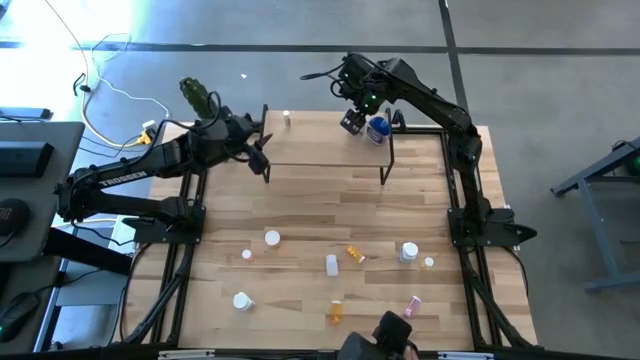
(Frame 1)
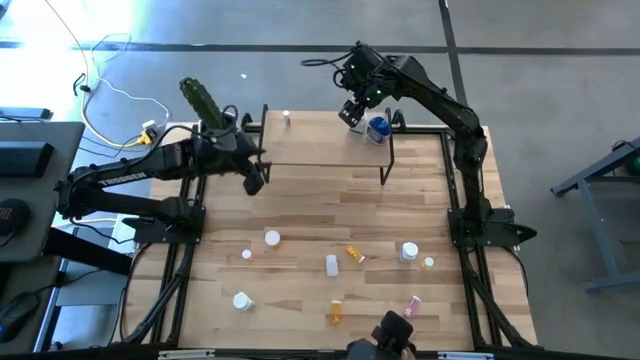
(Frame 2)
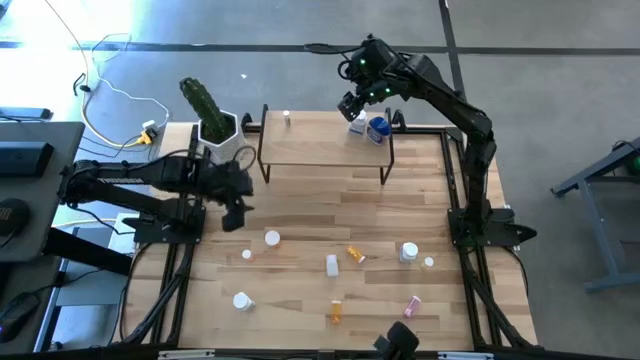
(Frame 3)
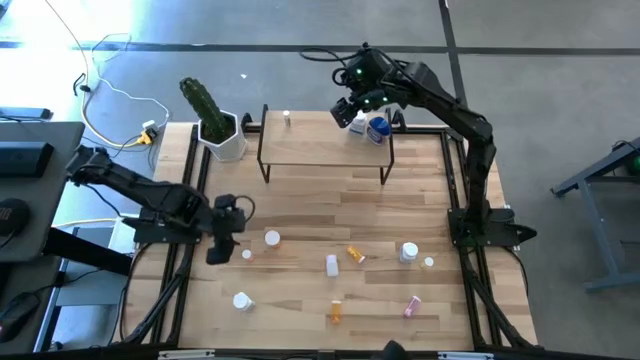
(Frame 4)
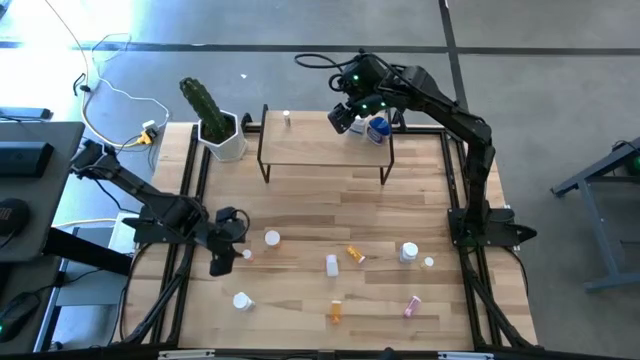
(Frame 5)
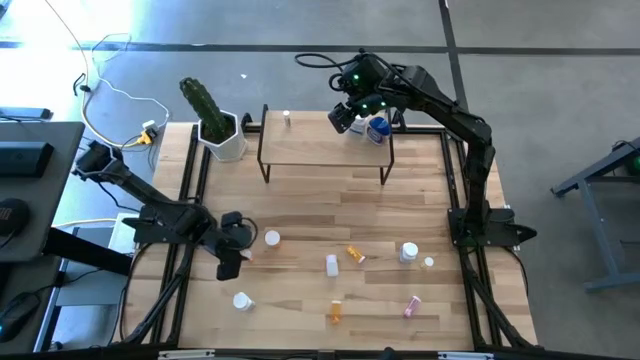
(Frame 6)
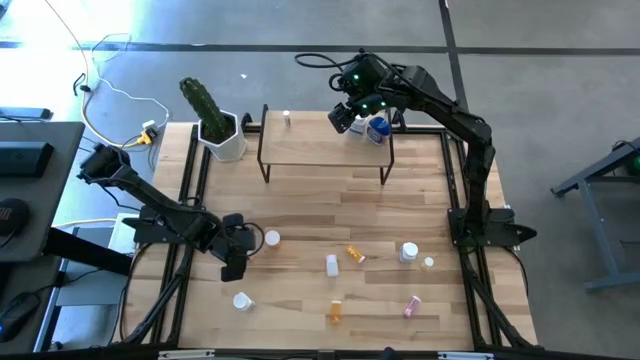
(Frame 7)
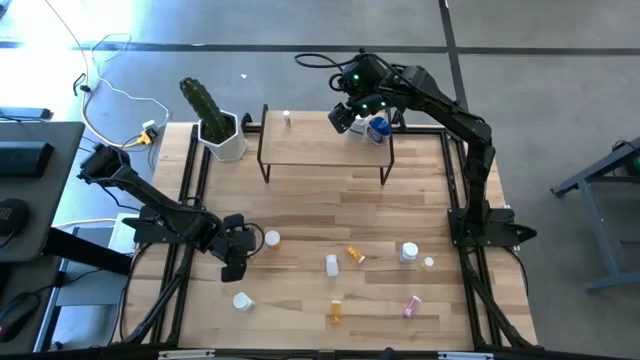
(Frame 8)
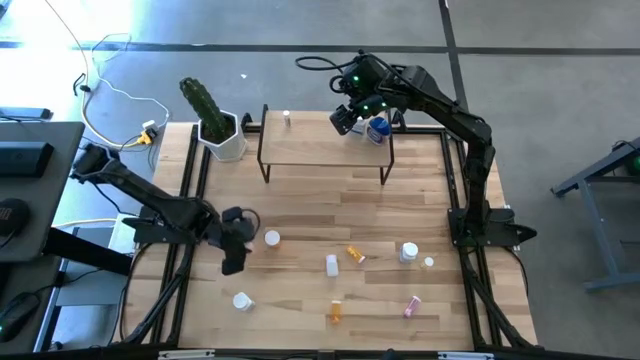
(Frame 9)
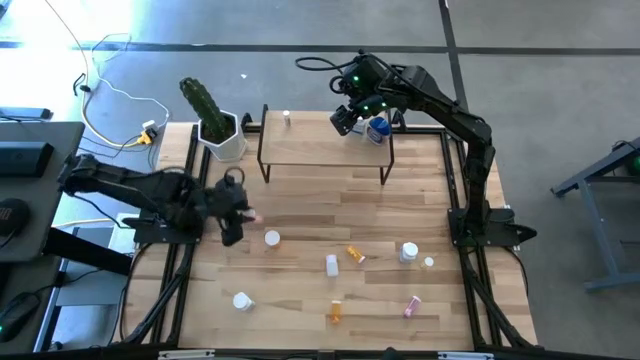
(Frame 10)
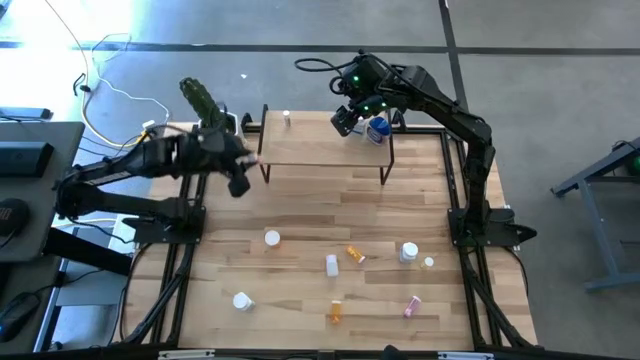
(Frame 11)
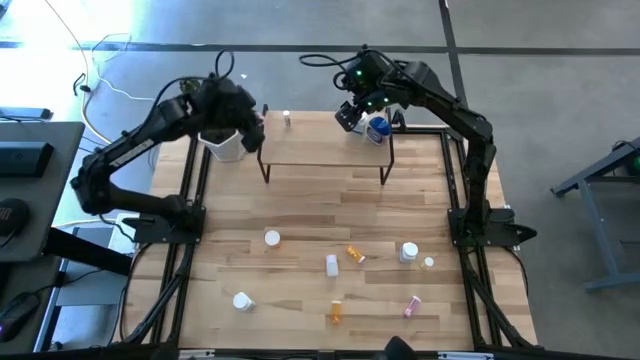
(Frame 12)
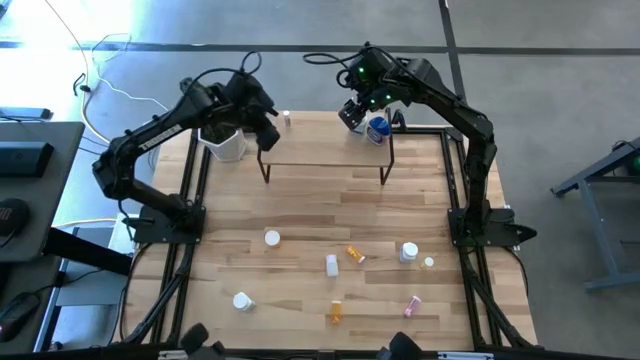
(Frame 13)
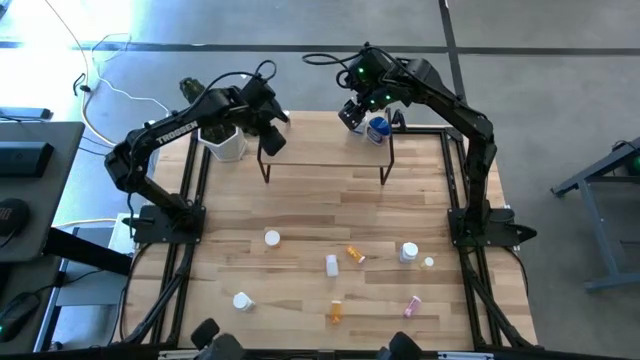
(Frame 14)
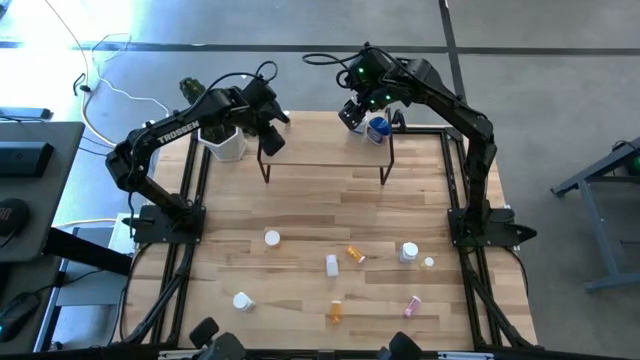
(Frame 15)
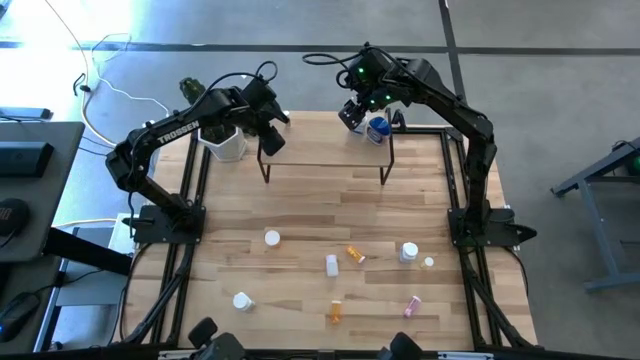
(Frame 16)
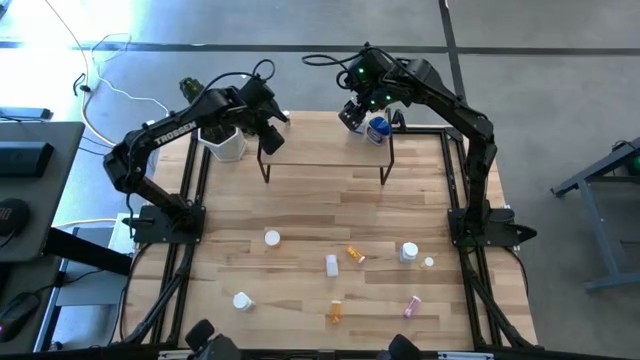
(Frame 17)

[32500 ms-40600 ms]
Task: Pick and place medicine bottles onto shelf by color
Put the left pink pill bottle on the shelf

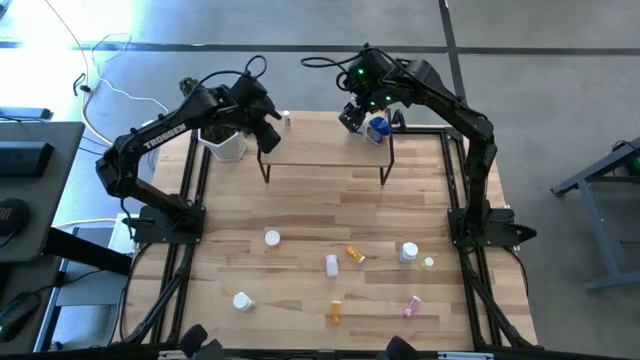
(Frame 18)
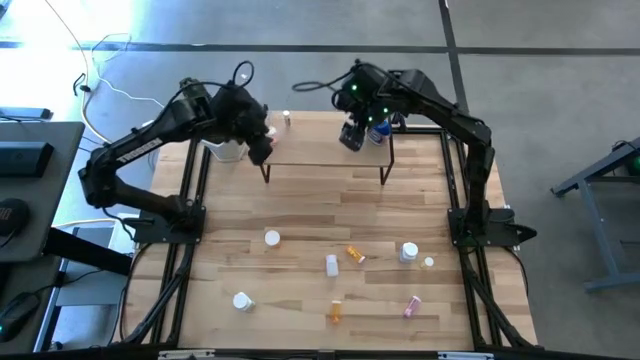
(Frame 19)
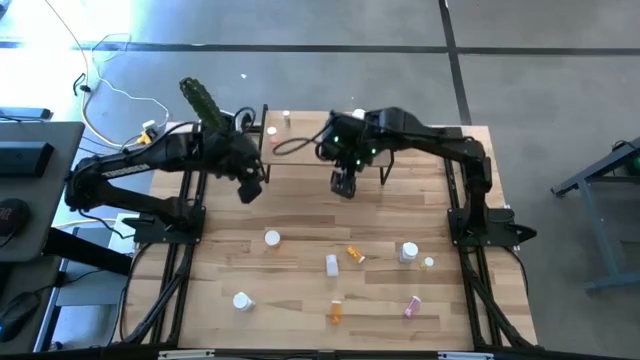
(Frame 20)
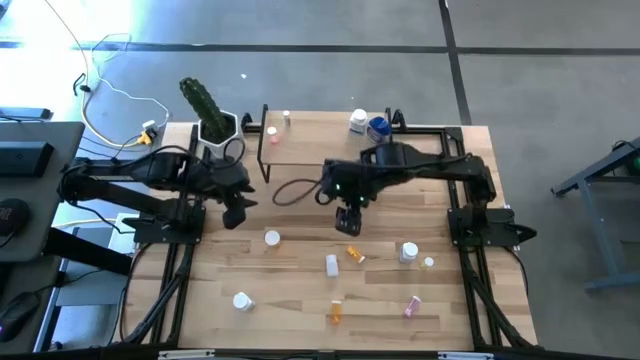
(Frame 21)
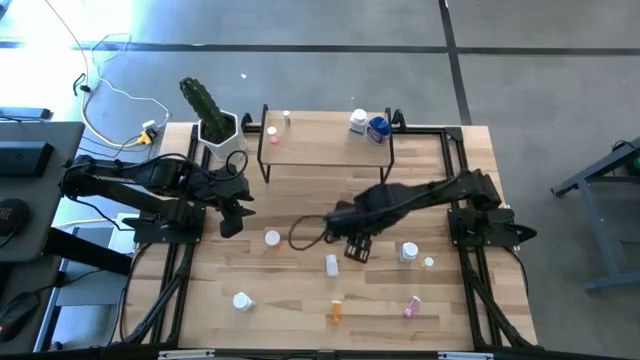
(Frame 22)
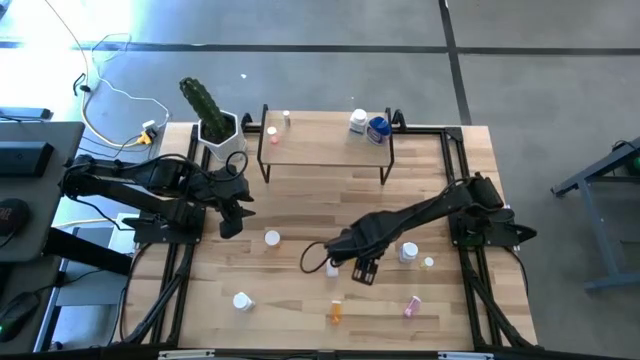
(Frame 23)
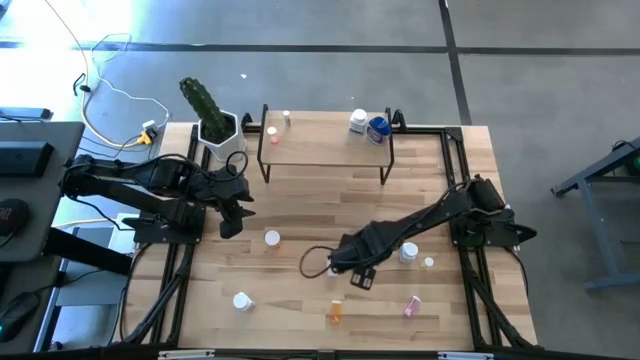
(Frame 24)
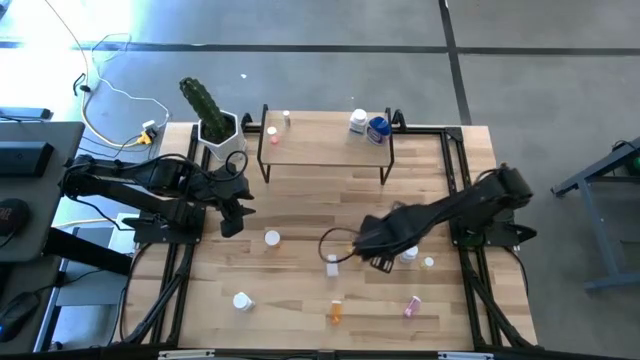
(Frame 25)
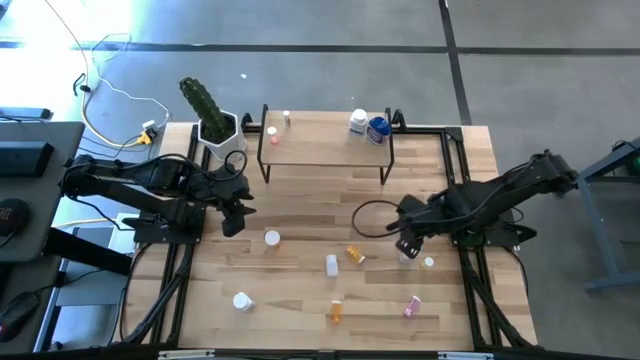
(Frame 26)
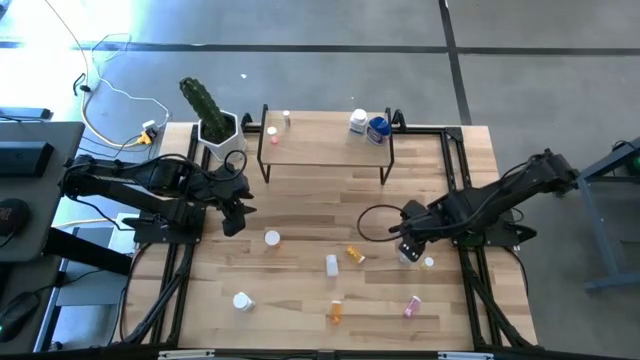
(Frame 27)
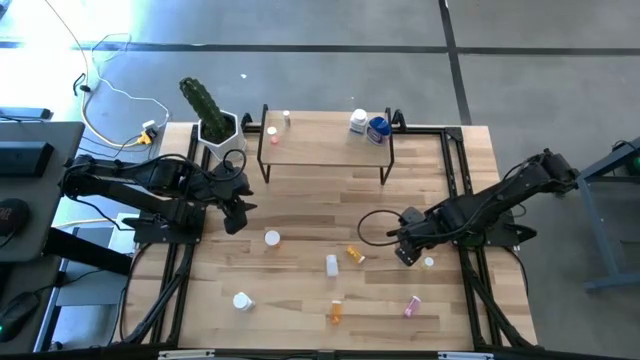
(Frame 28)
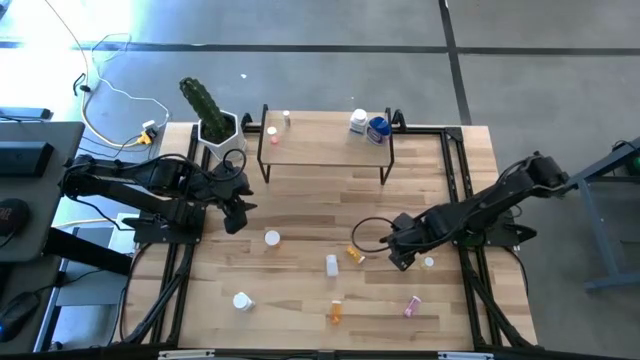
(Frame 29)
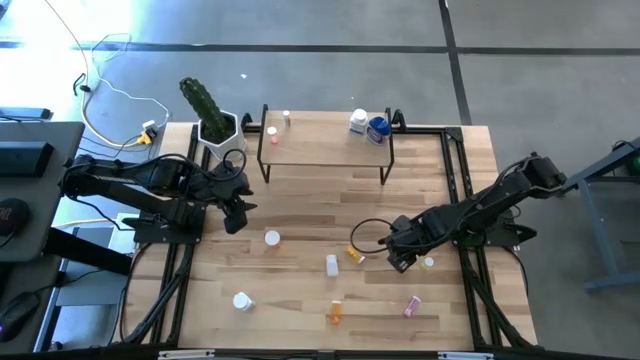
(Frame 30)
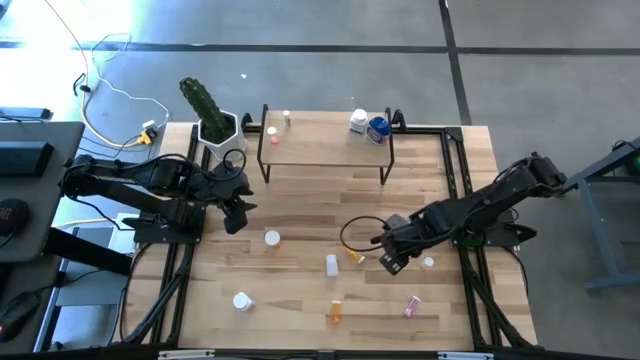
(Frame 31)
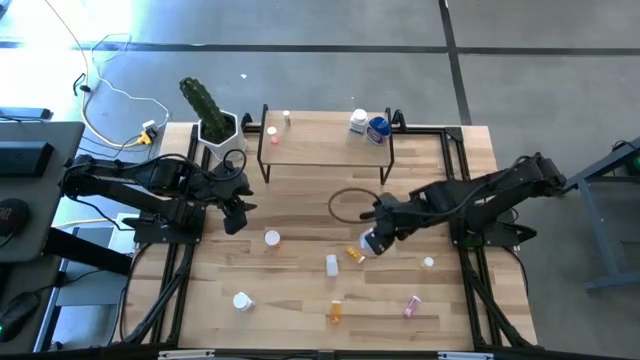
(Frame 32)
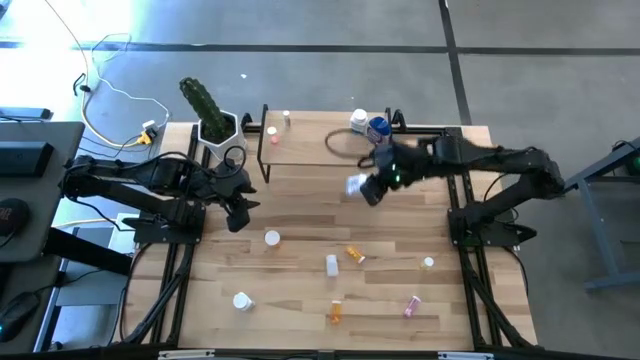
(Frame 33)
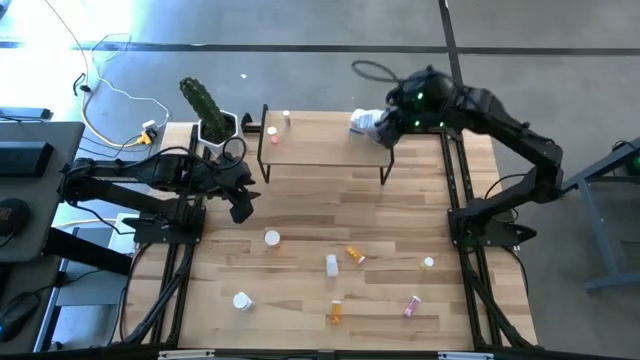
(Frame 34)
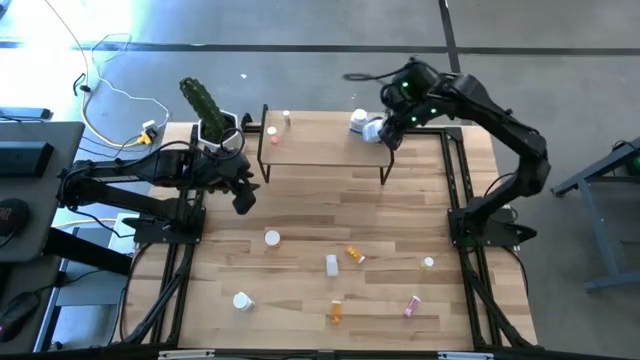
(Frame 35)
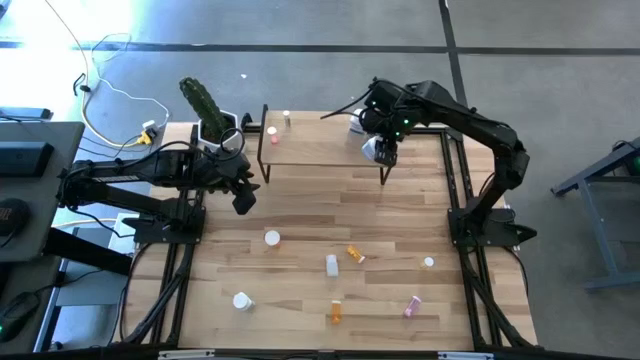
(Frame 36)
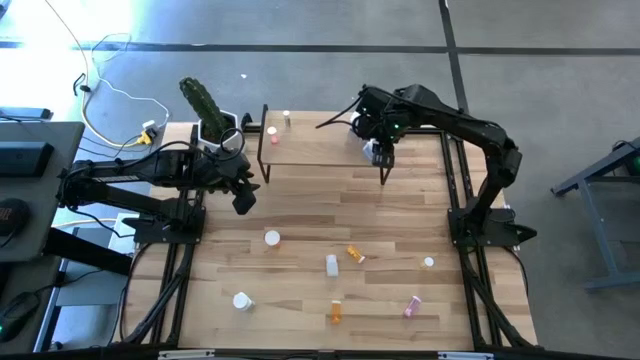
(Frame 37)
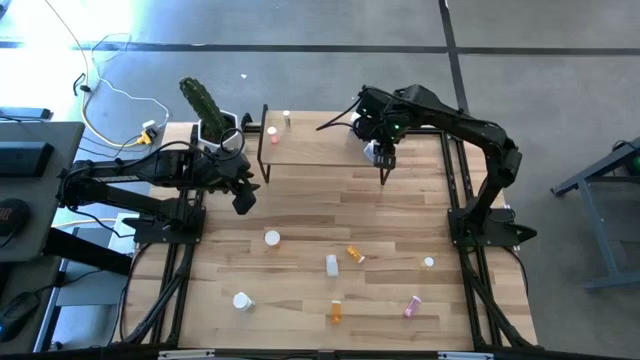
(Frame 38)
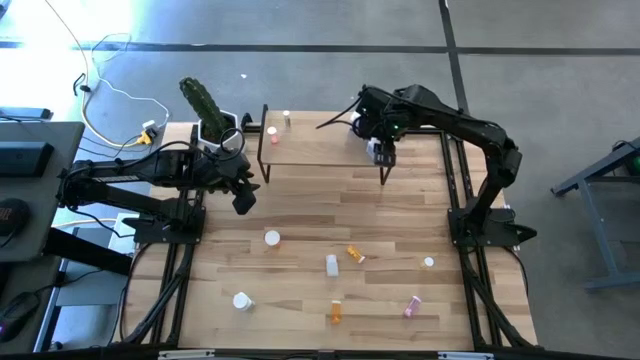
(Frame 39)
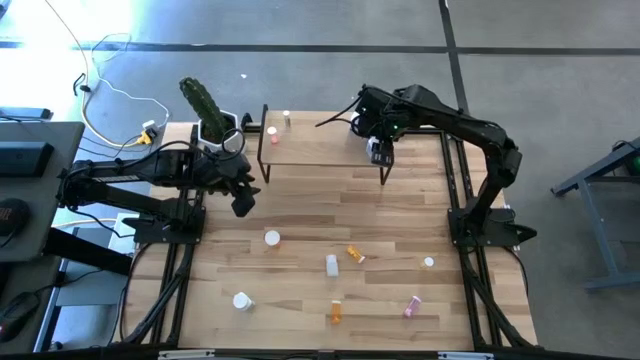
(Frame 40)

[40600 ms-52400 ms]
Put the right blue pill bottle on the shelf
